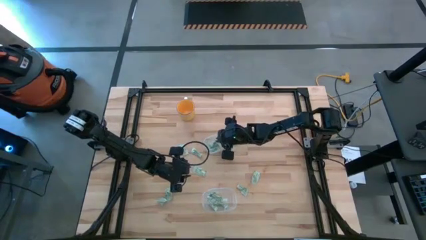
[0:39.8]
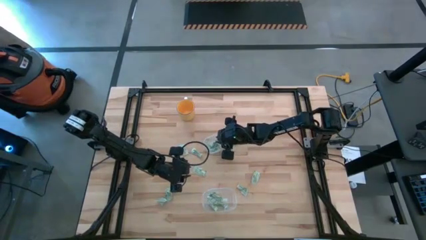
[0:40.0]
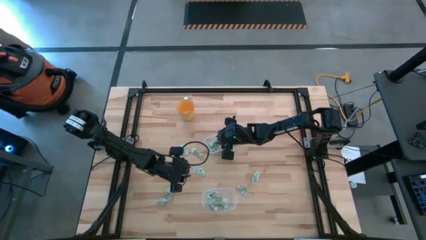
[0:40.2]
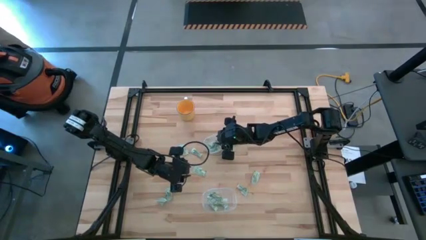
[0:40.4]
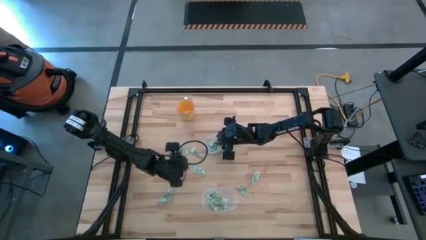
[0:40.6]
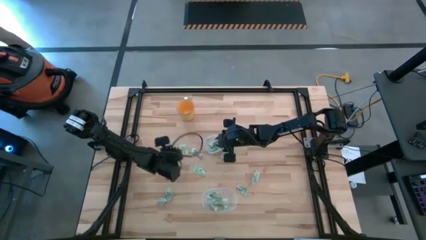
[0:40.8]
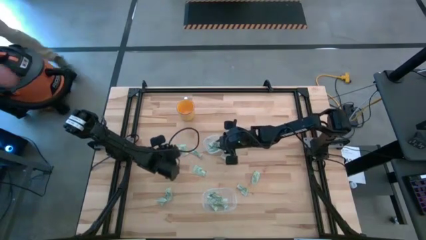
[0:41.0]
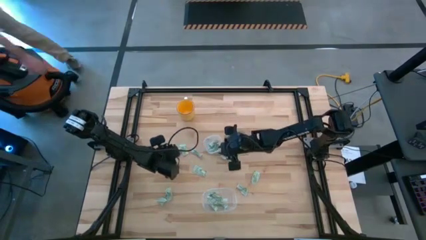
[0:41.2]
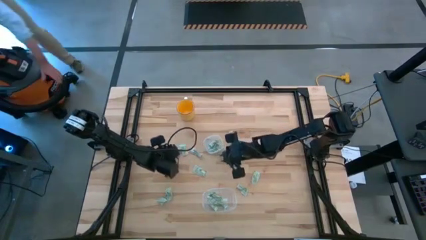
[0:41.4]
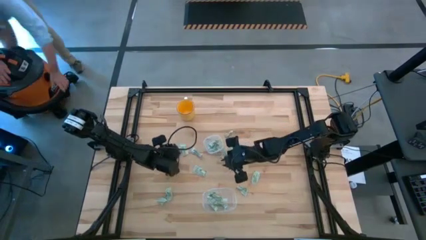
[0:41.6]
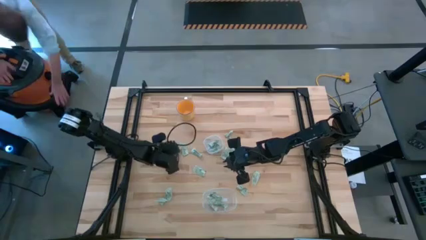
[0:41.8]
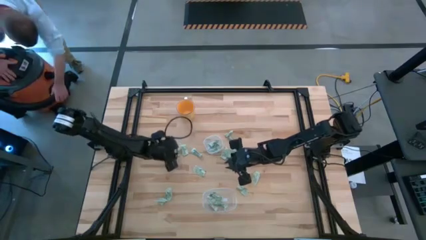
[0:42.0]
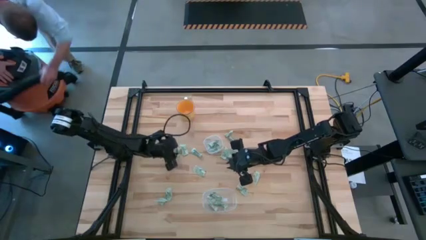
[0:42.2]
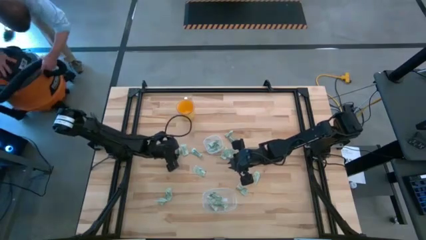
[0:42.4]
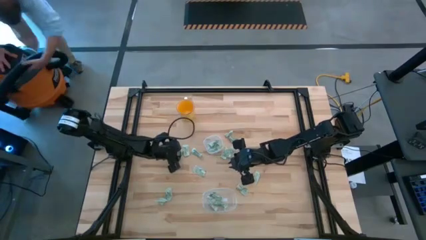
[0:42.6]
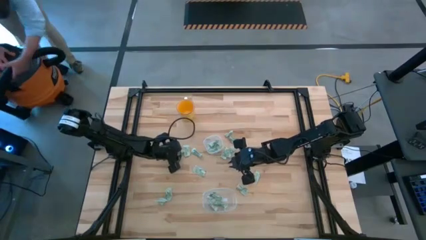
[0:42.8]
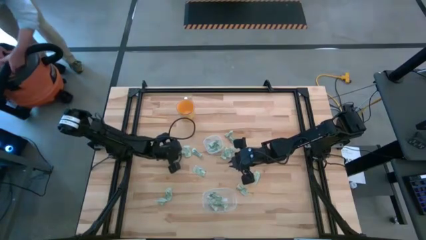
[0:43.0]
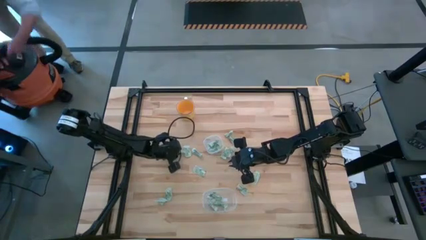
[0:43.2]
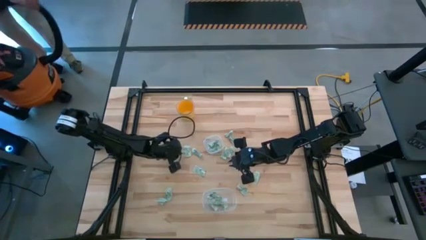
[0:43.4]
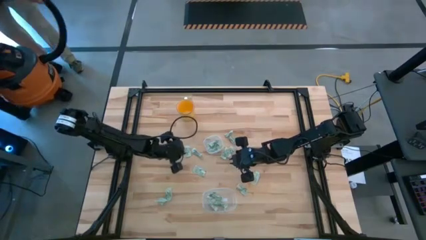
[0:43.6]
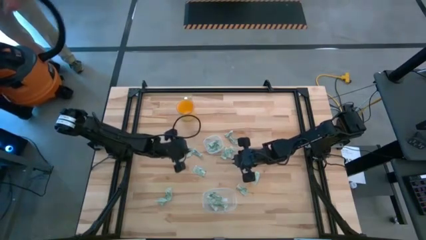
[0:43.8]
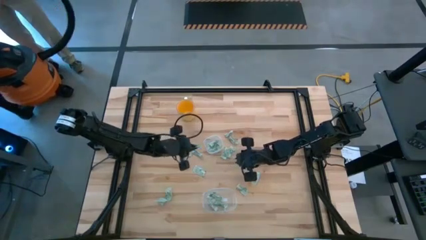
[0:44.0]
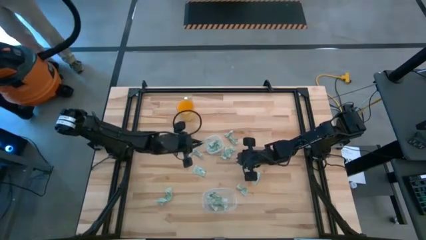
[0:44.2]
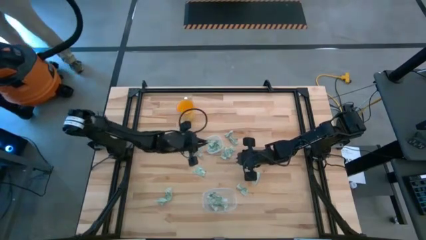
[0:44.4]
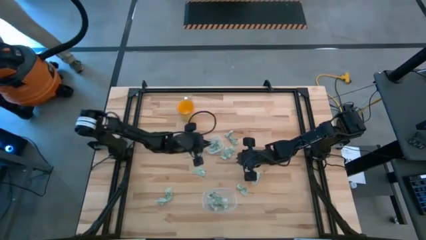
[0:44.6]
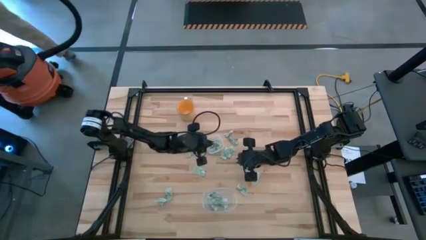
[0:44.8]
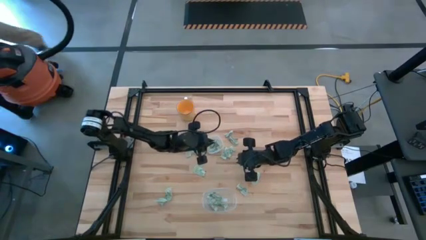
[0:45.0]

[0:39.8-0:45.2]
Put the white stevia packet into the bottom transparent bin

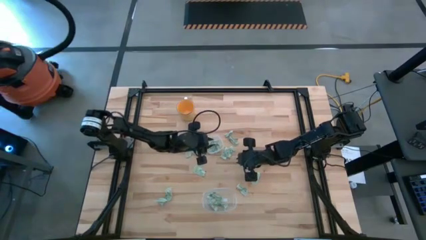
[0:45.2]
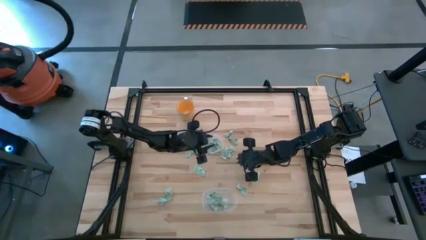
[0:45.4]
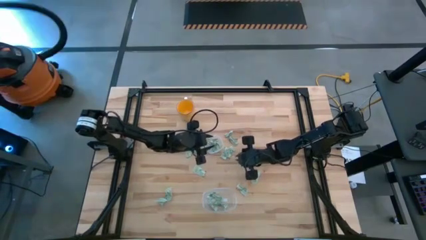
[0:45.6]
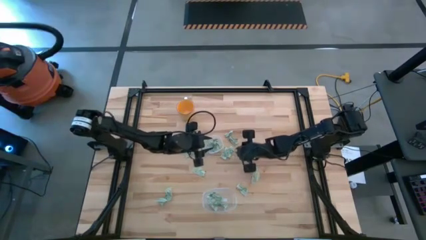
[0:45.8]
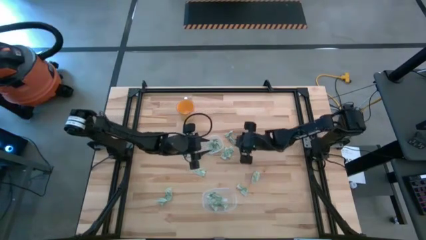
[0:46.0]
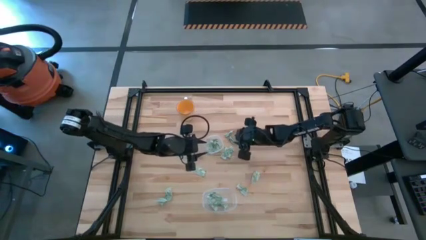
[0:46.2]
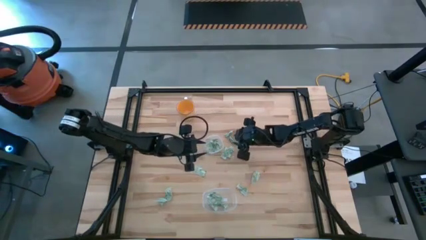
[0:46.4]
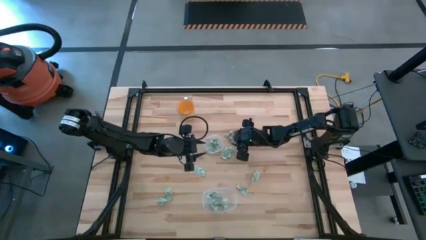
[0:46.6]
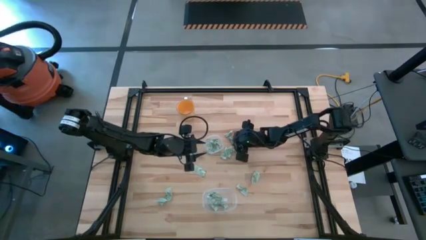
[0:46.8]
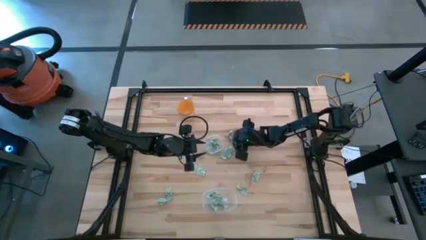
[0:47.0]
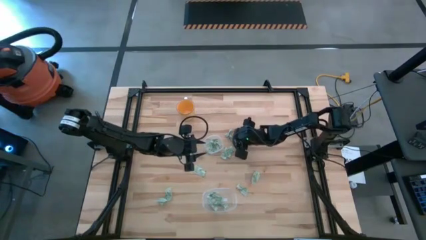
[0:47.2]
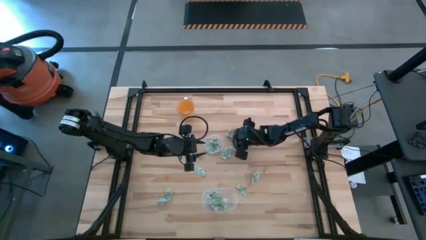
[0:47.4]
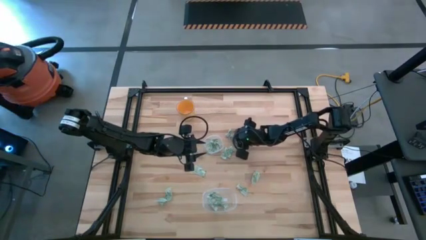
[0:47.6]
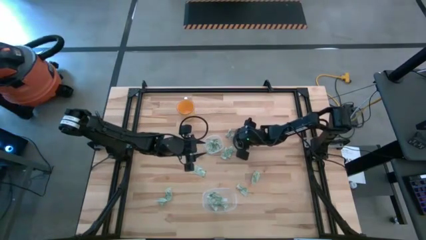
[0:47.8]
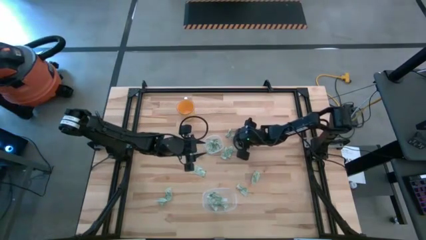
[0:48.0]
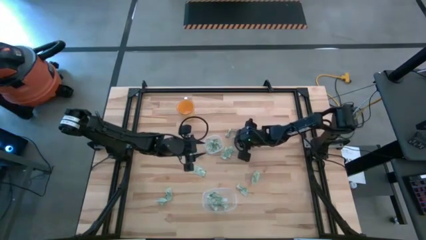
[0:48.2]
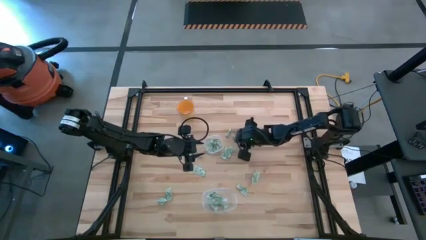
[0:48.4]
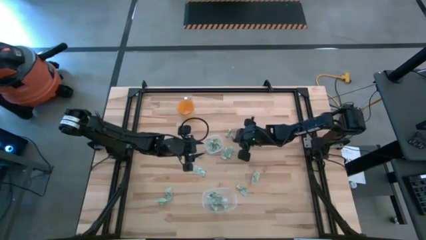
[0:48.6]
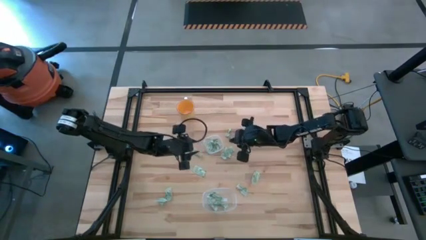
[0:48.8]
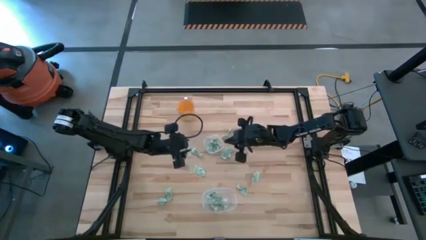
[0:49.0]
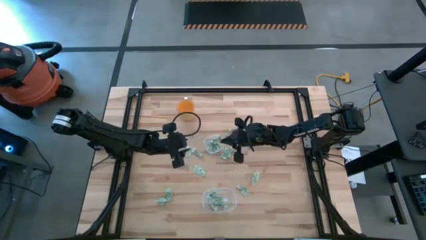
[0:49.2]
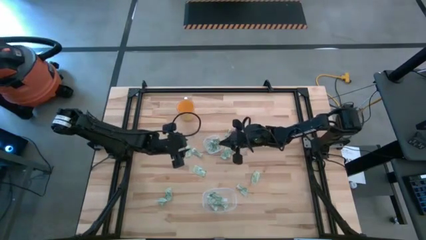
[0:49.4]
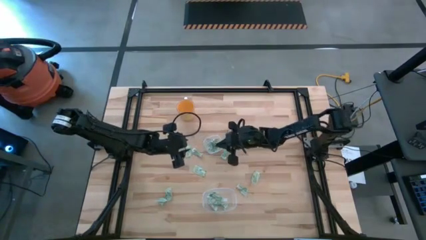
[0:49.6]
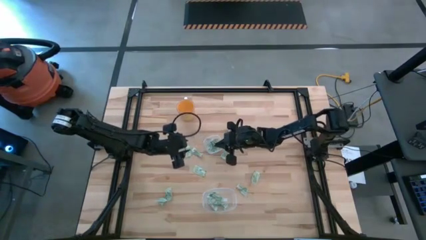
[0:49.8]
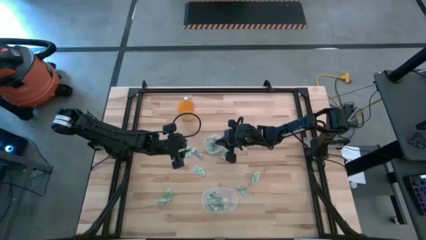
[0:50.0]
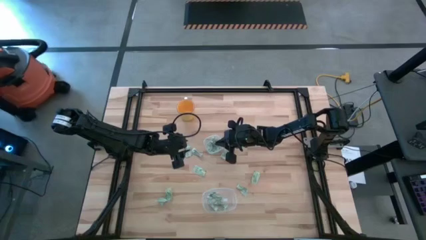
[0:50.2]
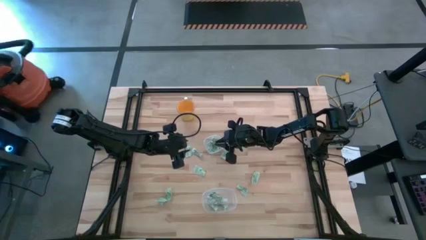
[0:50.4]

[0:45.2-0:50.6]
Put the white stevia packet into the top transparent bin

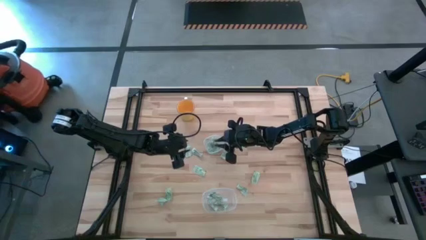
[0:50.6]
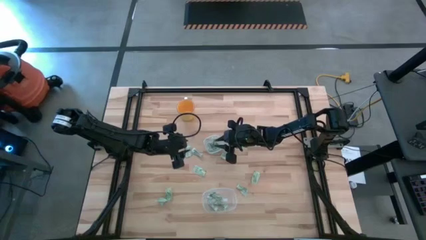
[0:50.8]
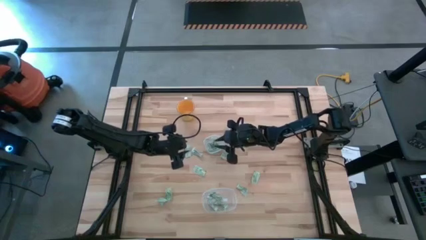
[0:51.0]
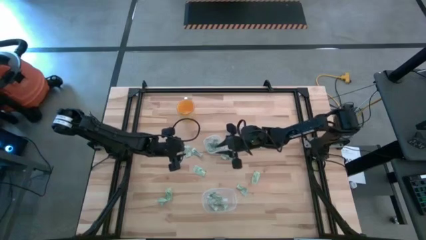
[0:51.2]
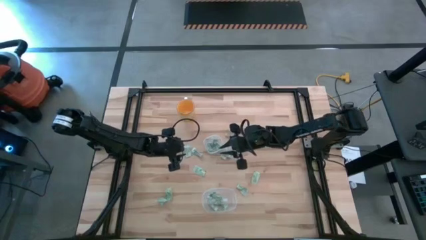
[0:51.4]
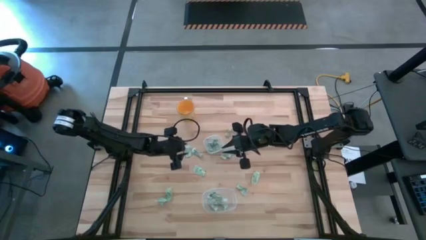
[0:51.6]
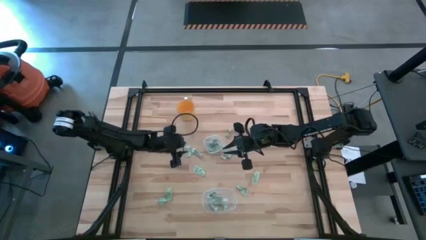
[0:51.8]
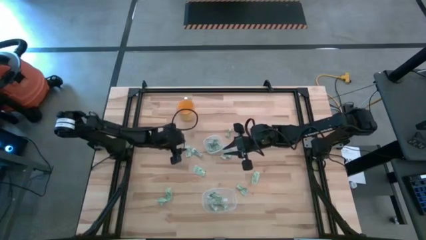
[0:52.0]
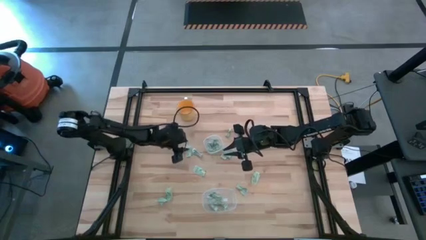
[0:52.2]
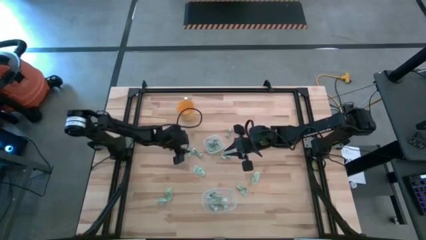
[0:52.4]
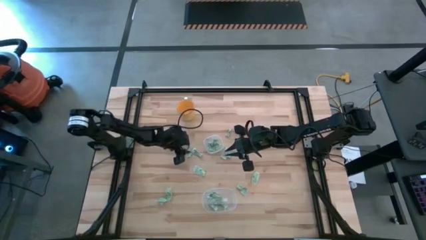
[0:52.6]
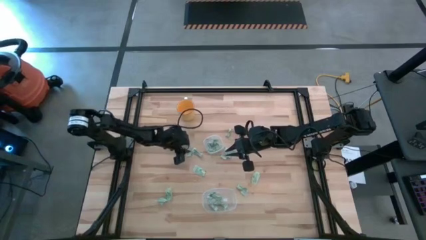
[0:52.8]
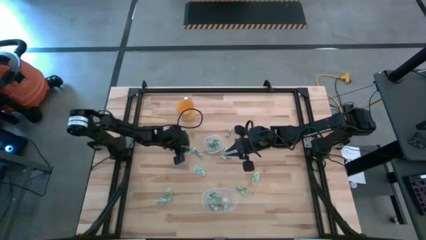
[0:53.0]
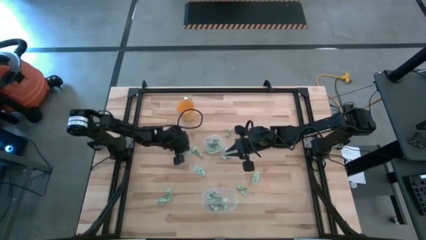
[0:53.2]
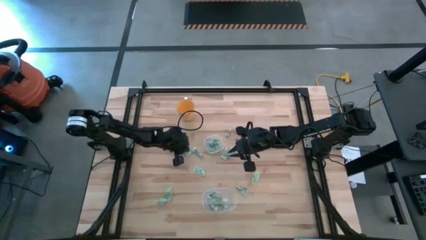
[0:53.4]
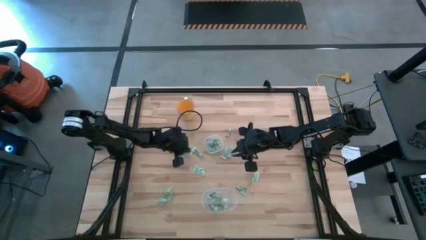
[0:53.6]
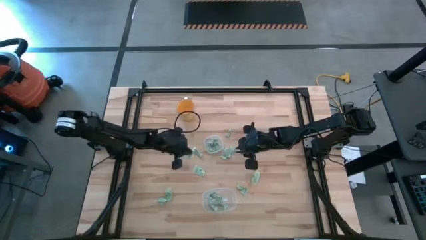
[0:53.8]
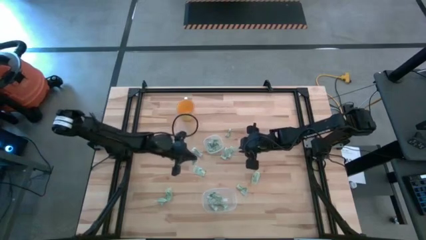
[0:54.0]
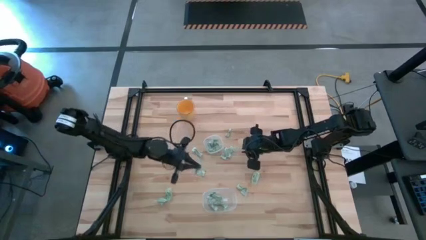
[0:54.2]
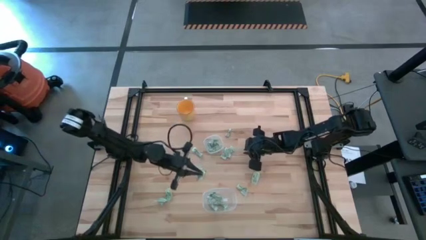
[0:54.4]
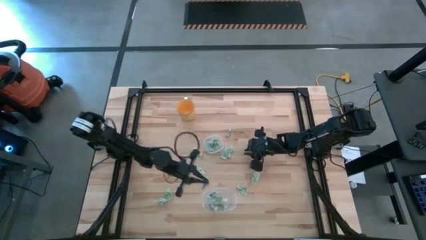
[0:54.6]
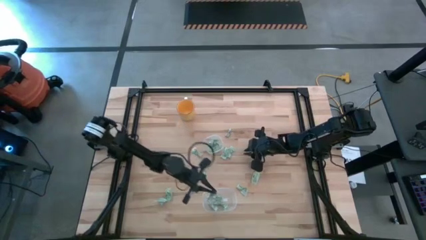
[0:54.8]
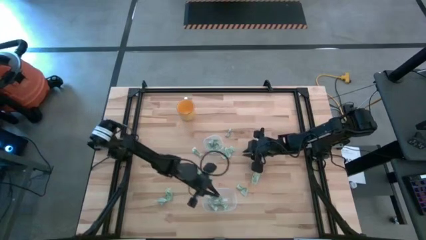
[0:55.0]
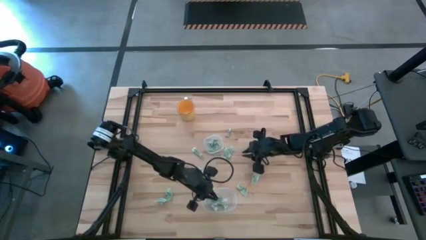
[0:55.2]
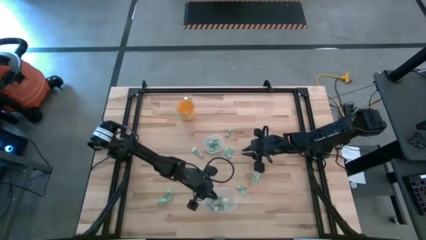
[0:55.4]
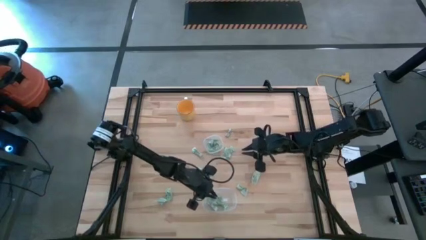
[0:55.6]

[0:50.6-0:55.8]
Put the white stevia packet into the bottom transparent bin
